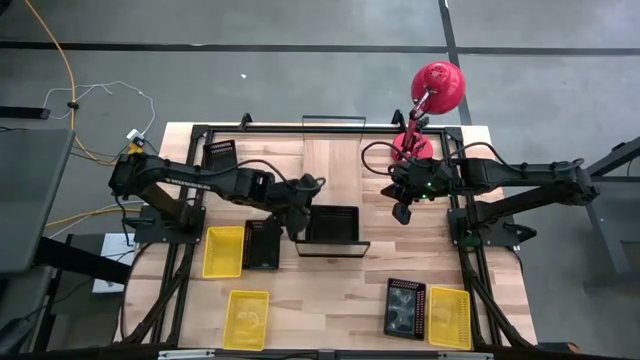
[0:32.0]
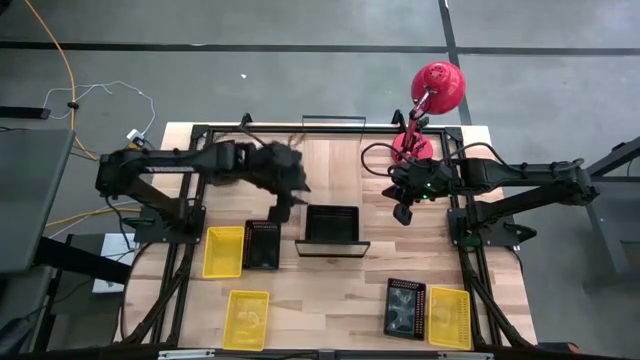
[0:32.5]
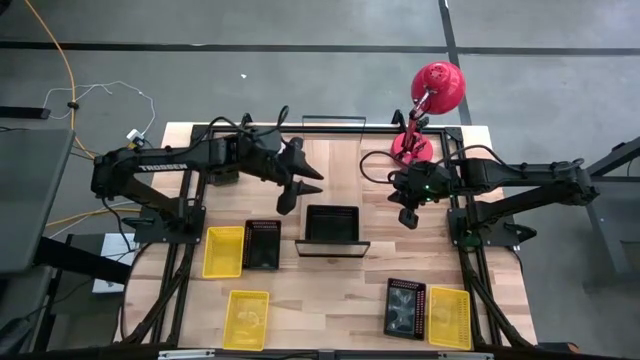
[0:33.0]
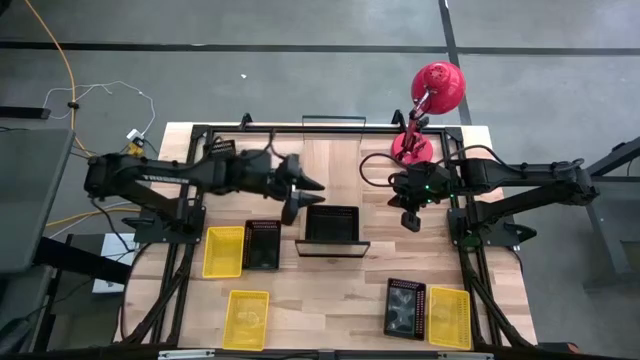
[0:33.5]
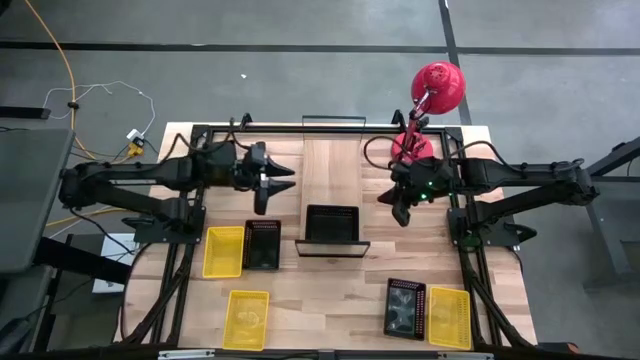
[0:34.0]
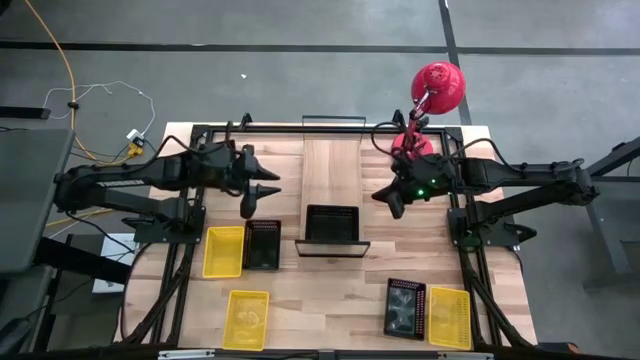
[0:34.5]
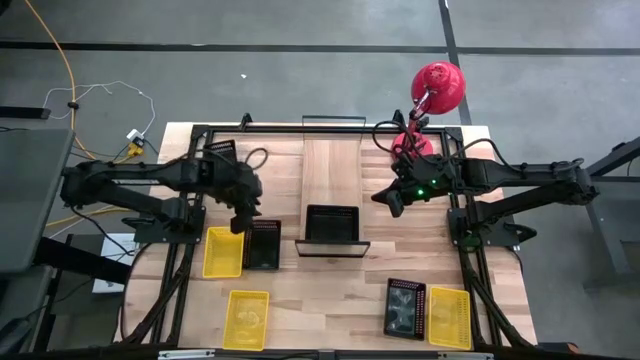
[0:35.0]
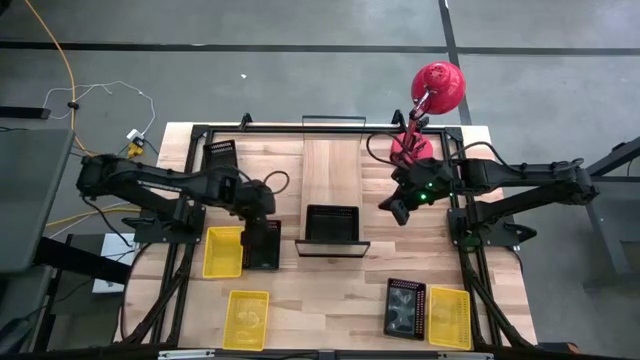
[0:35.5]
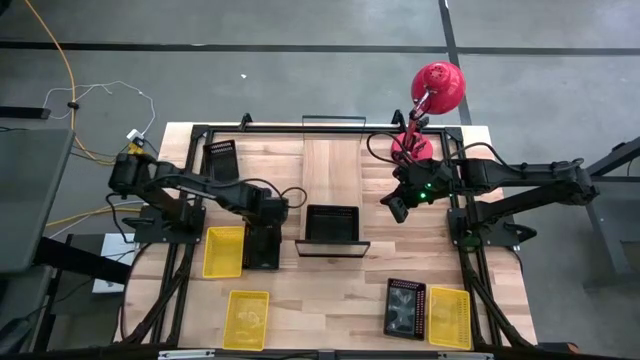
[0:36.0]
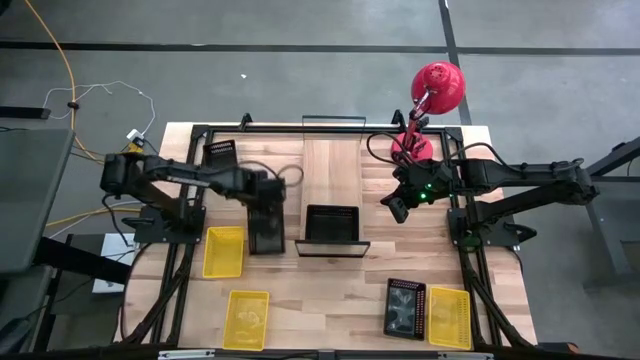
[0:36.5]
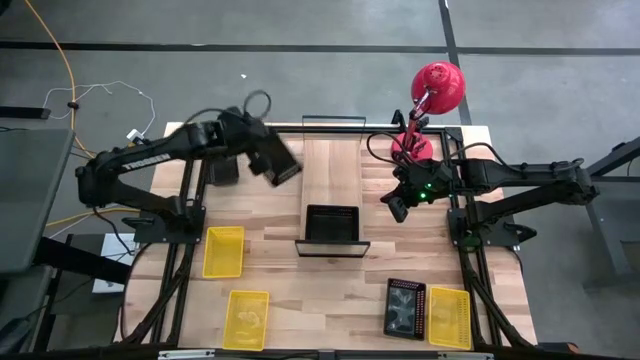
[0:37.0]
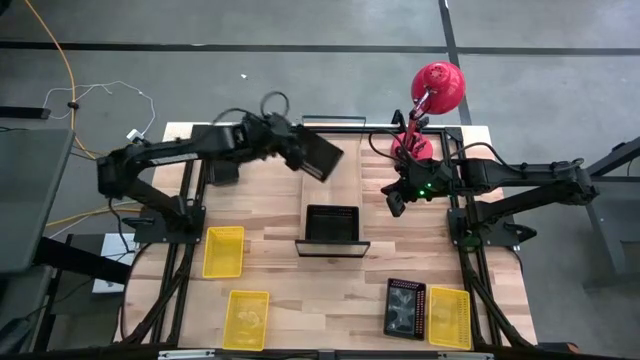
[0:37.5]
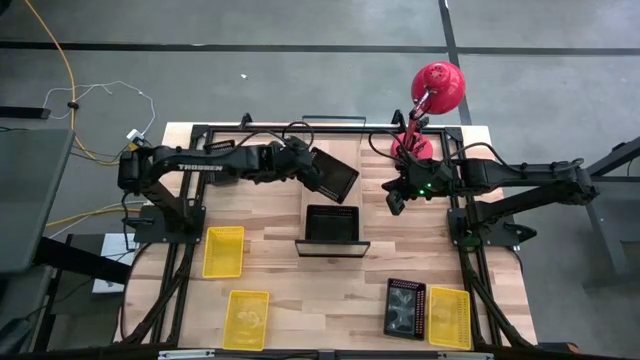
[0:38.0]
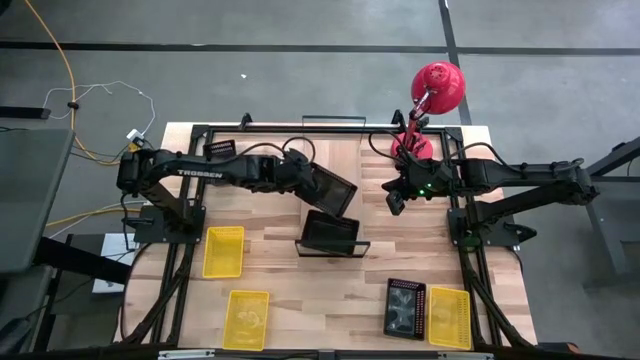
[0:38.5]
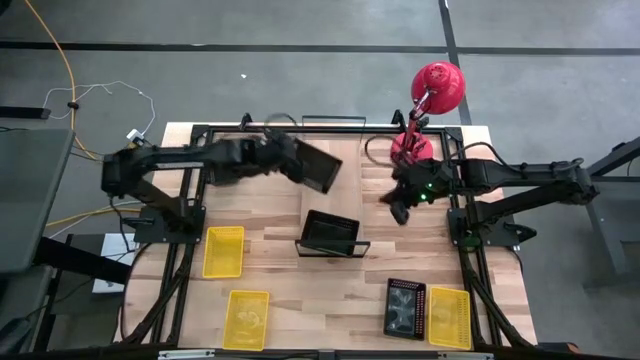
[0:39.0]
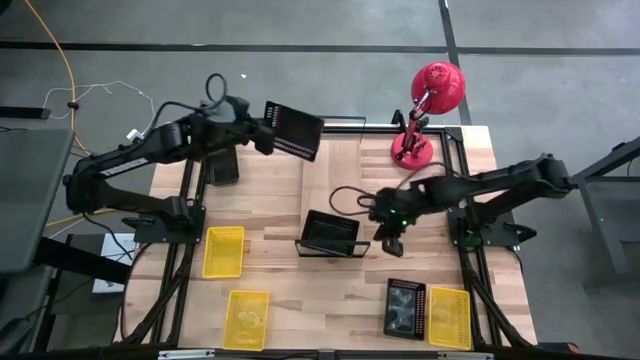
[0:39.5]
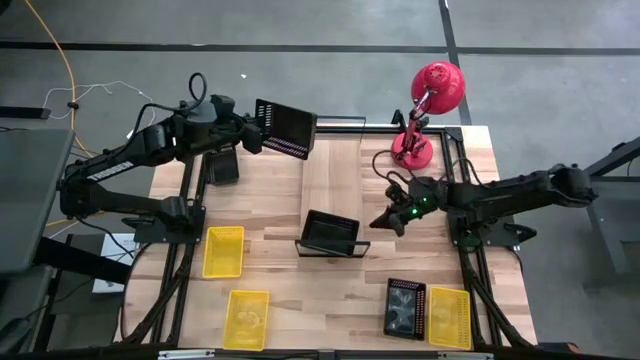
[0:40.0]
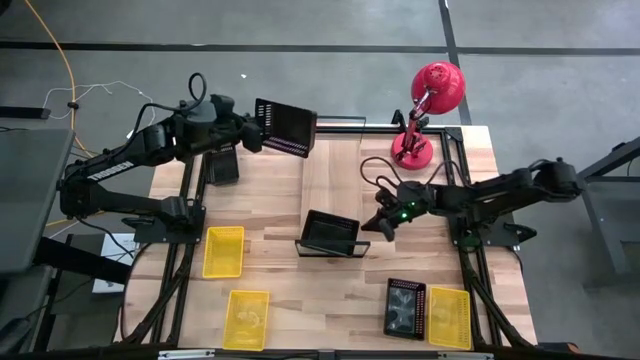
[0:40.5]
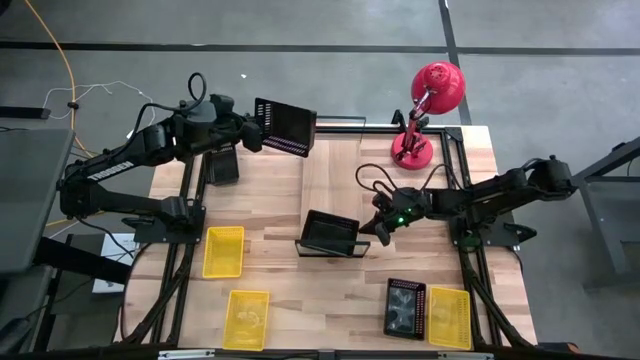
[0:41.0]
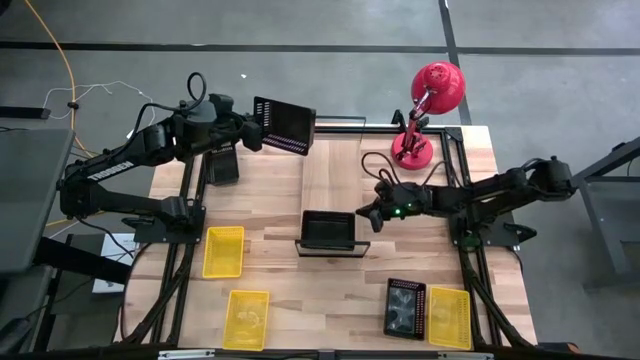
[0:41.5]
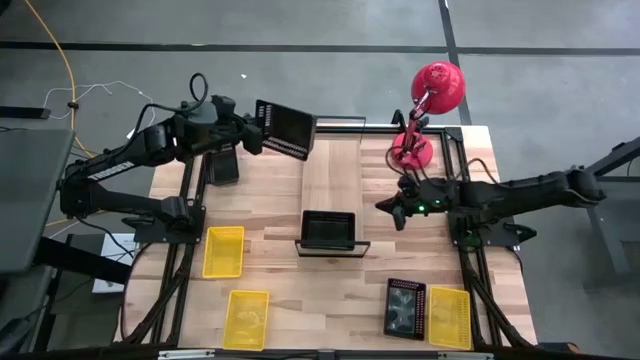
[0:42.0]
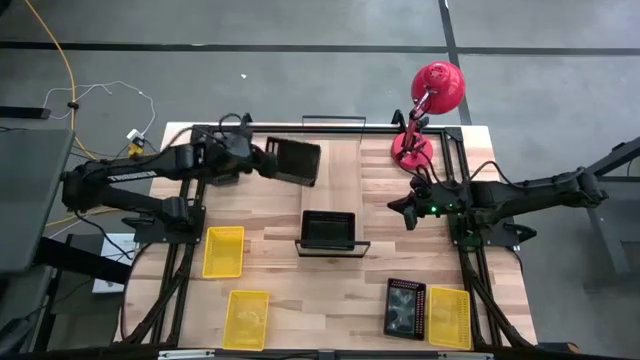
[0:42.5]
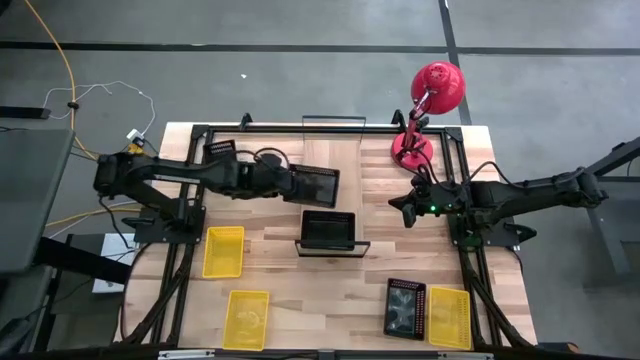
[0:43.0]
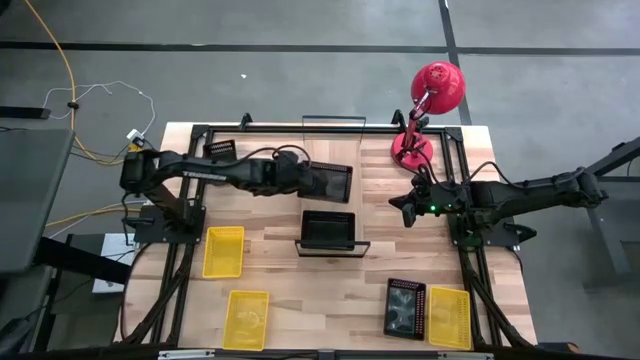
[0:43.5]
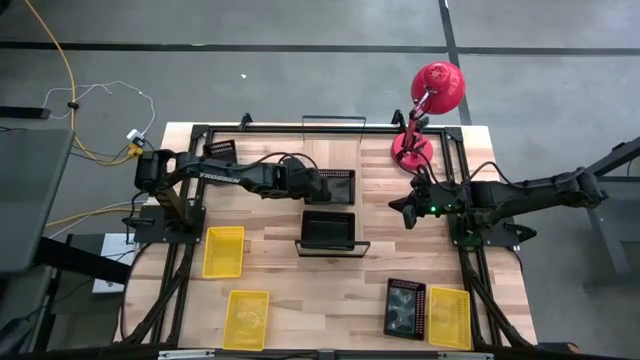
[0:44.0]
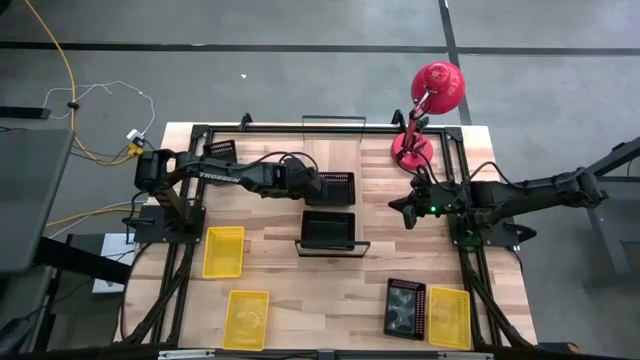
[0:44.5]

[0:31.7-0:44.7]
Task: Stack baskets on shelf by color
Put the black bin on the shelf

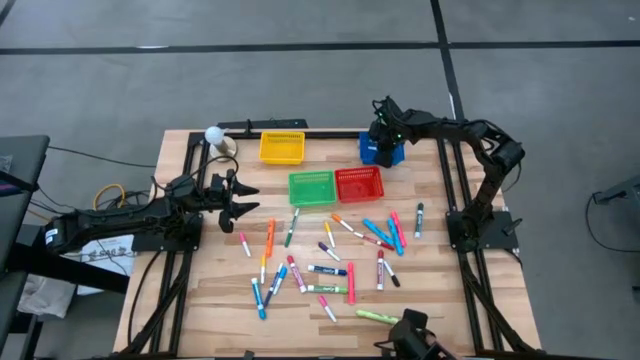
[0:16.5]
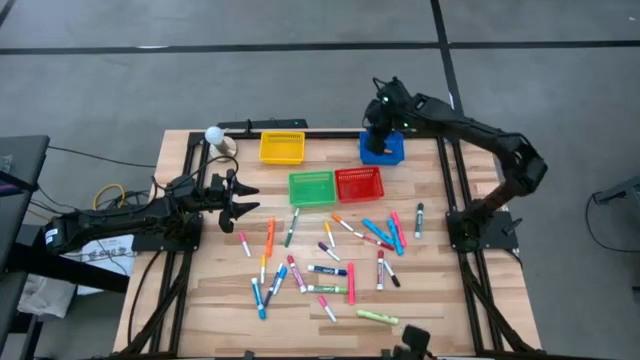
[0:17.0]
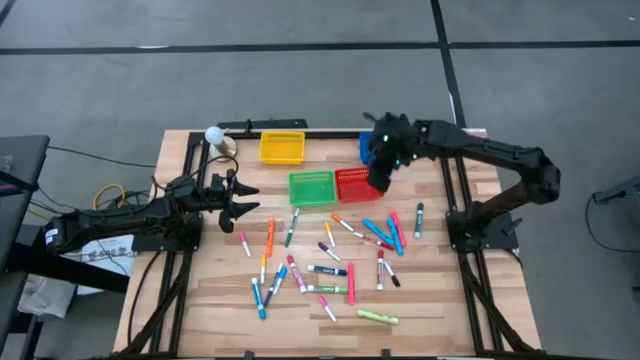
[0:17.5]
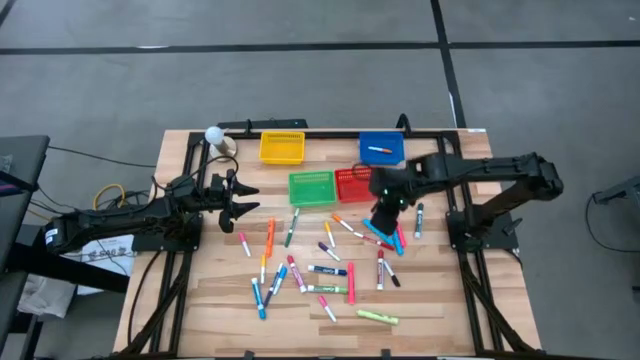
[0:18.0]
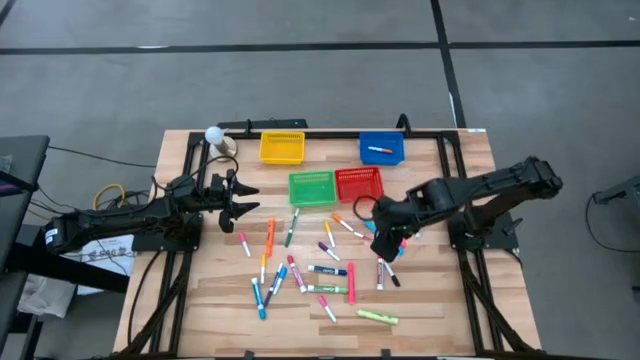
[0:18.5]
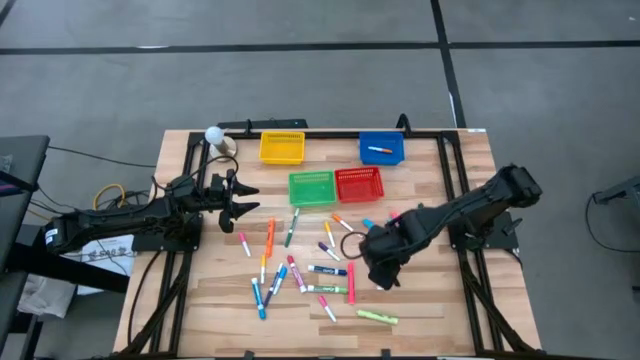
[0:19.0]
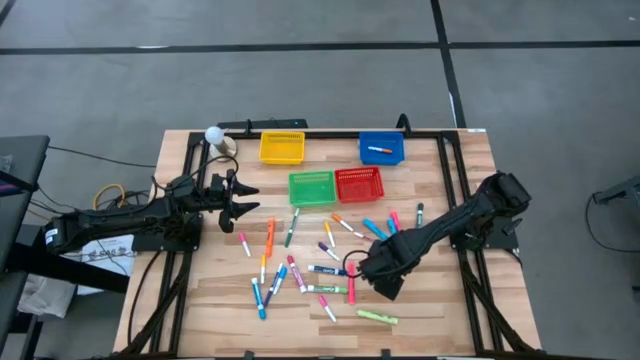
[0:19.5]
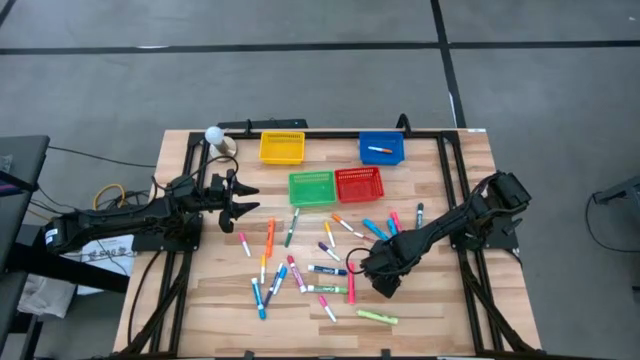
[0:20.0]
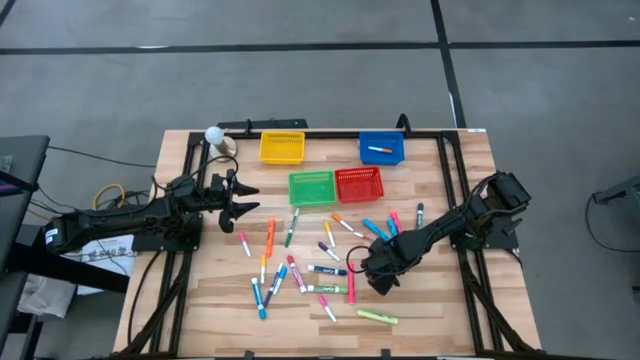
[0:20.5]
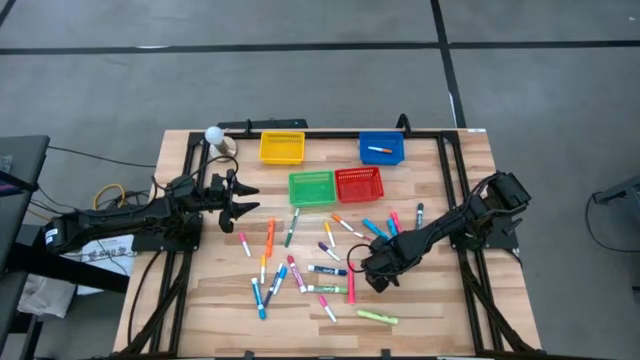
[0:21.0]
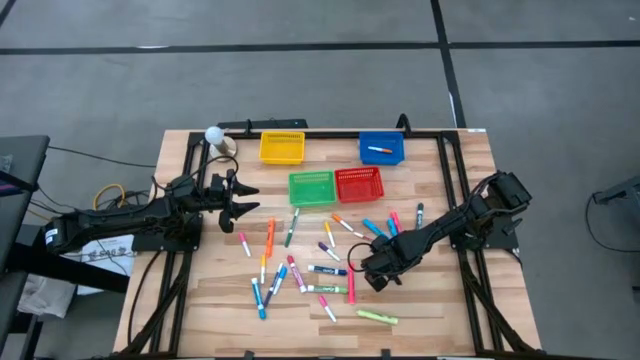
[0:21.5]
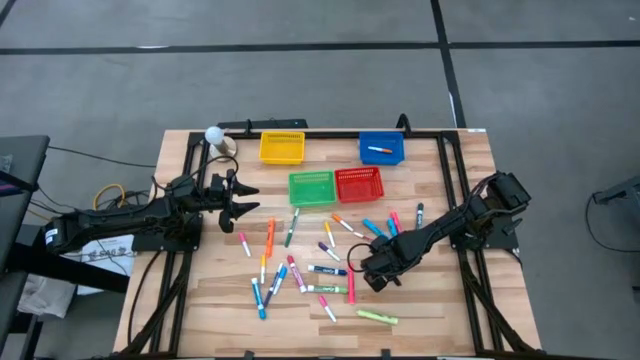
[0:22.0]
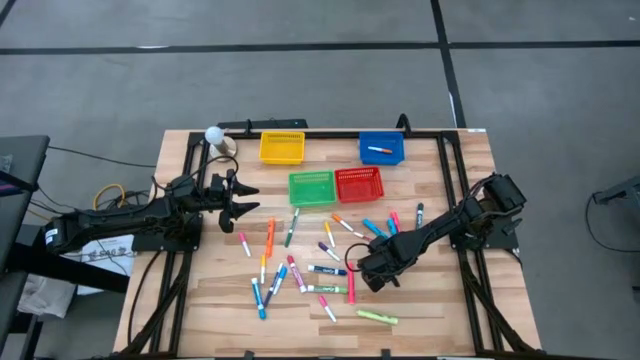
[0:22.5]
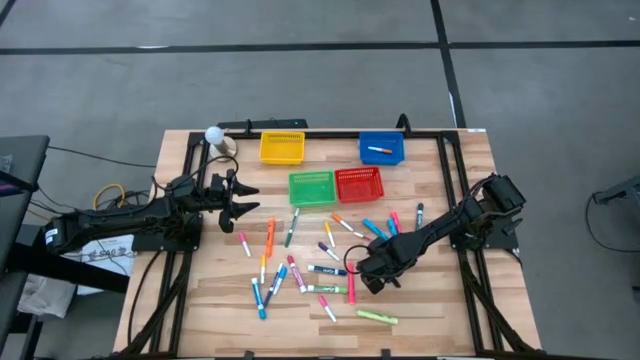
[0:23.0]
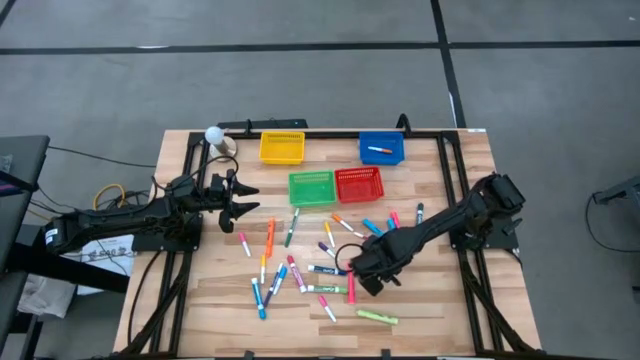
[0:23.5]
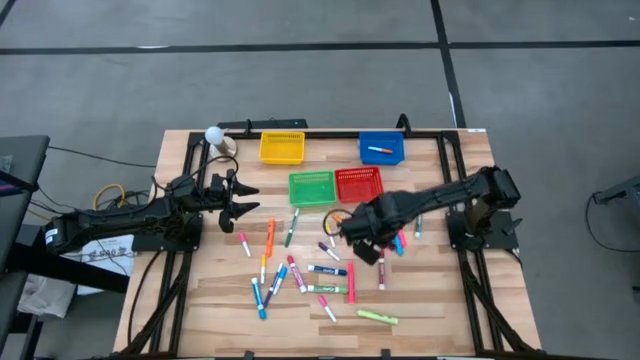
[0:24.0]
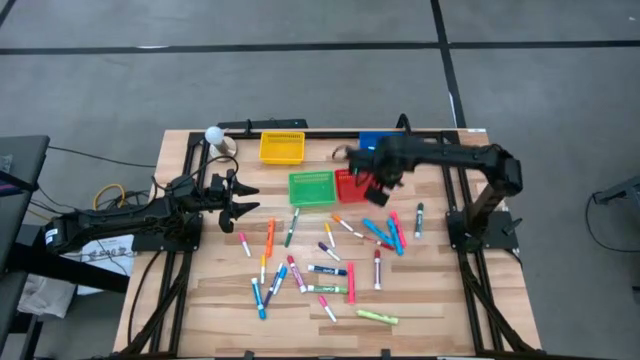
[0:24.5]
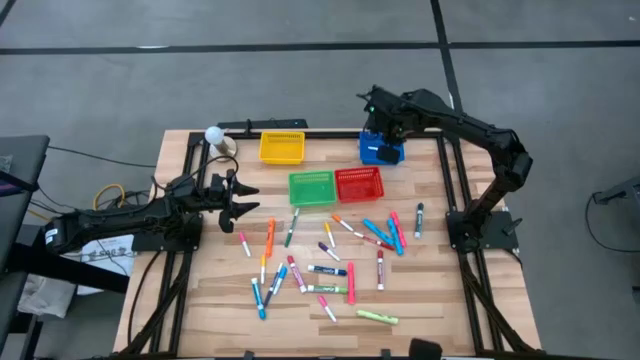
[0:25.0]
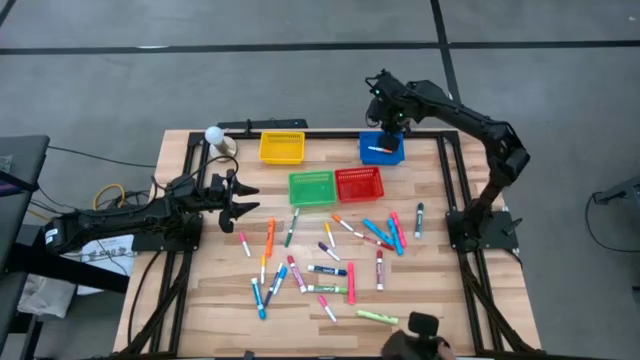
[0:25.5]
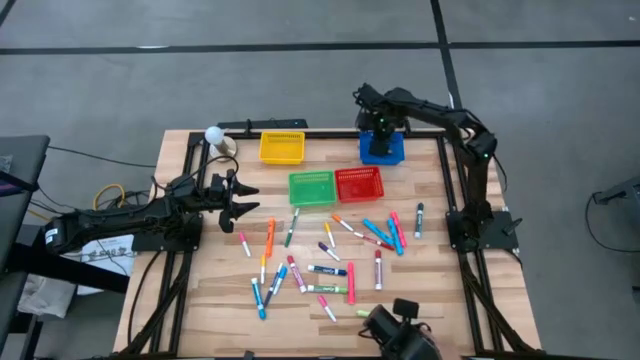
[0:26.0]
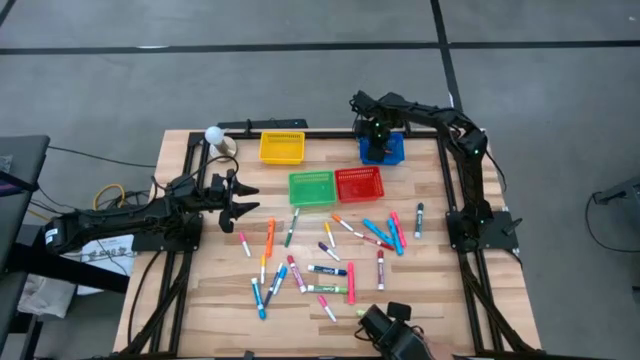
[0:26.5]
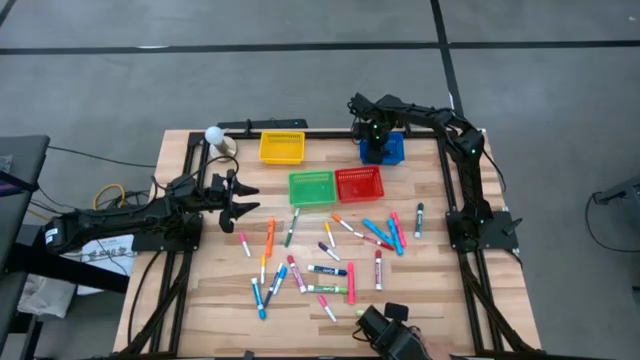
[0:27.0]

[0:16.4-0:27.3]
Task: Pick & Place Markers
Put the black highlighter pen into the blue bin
